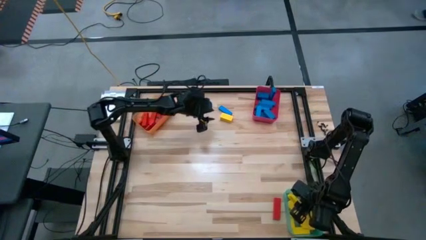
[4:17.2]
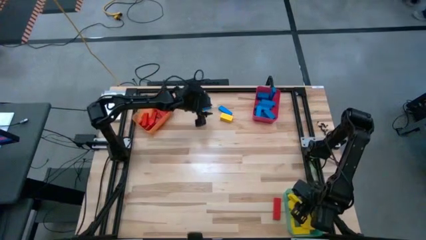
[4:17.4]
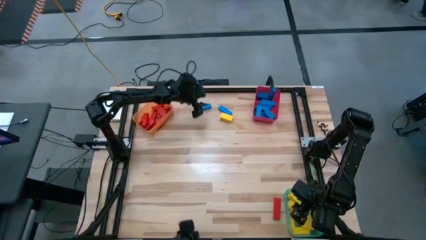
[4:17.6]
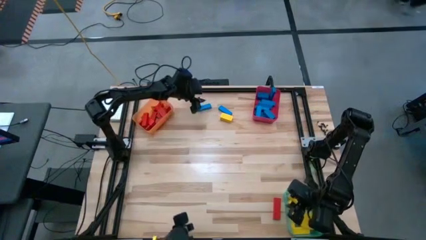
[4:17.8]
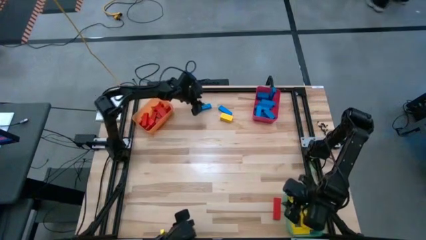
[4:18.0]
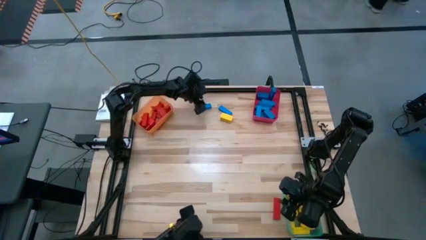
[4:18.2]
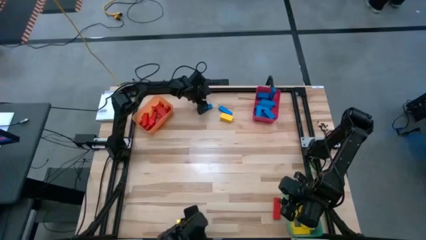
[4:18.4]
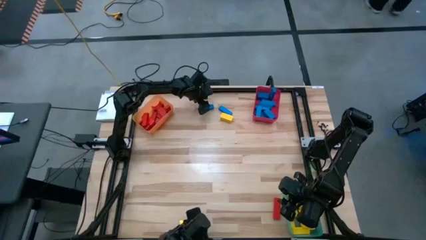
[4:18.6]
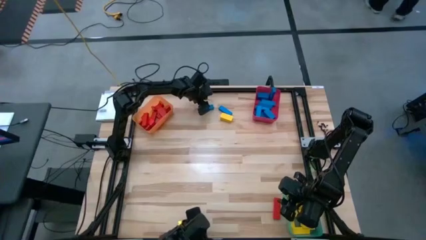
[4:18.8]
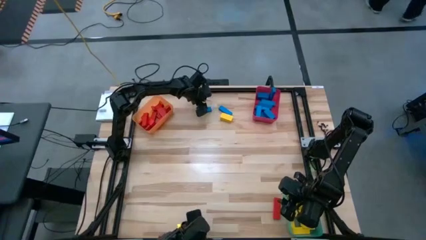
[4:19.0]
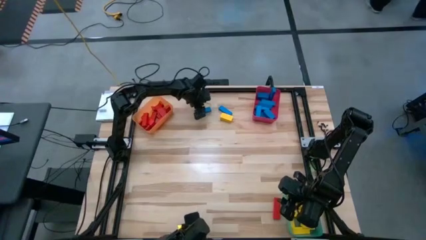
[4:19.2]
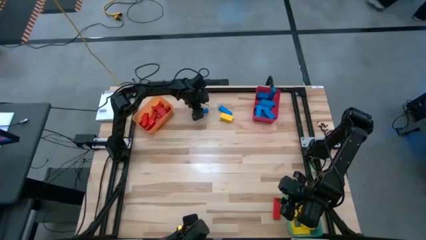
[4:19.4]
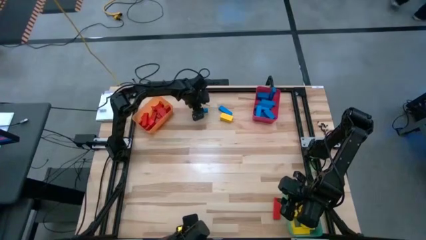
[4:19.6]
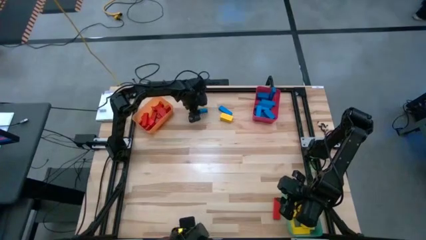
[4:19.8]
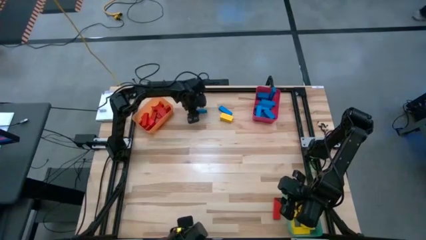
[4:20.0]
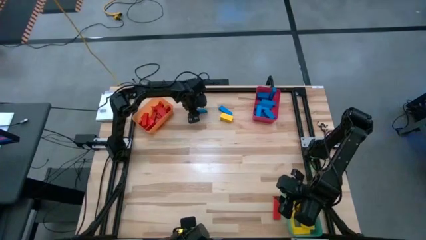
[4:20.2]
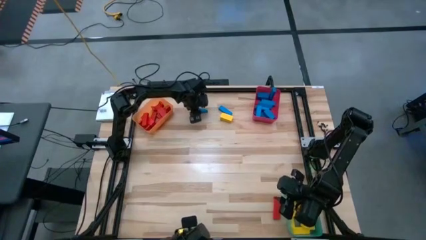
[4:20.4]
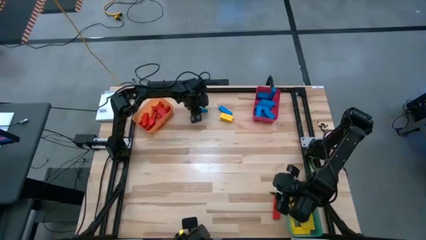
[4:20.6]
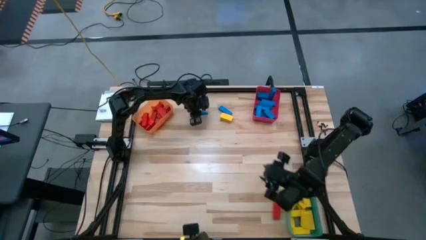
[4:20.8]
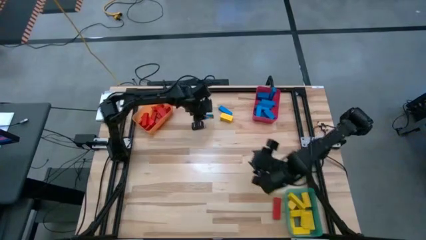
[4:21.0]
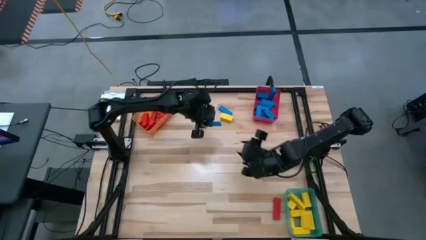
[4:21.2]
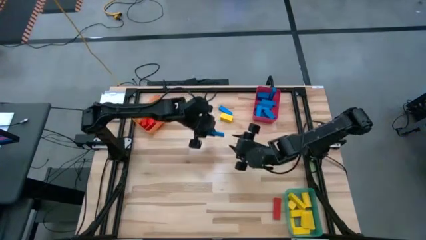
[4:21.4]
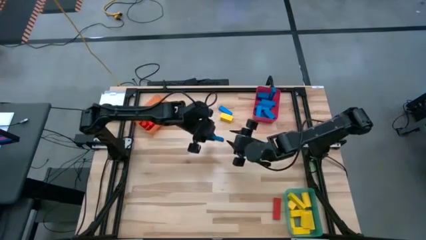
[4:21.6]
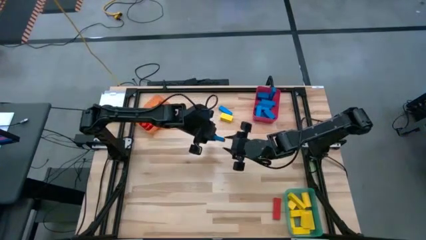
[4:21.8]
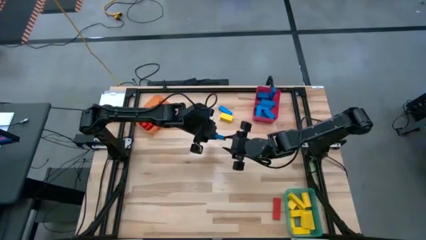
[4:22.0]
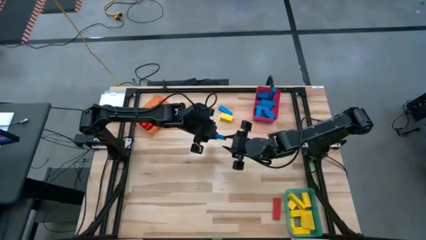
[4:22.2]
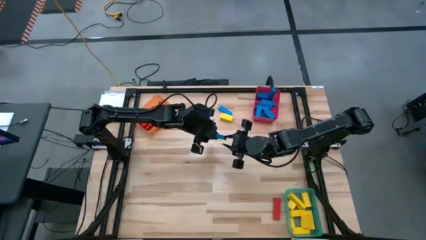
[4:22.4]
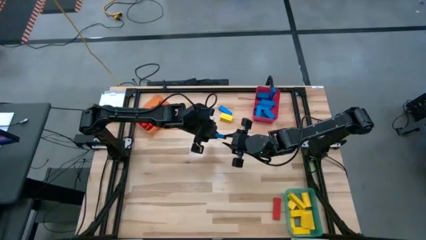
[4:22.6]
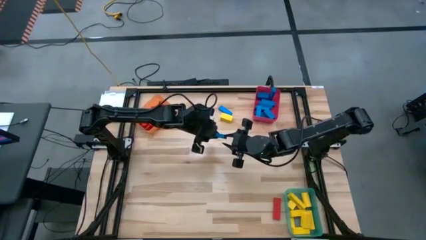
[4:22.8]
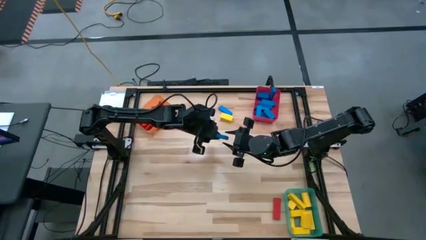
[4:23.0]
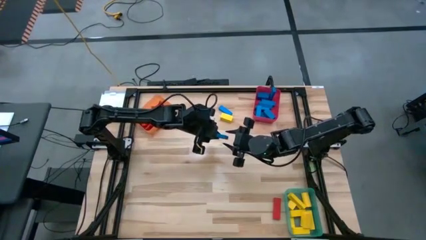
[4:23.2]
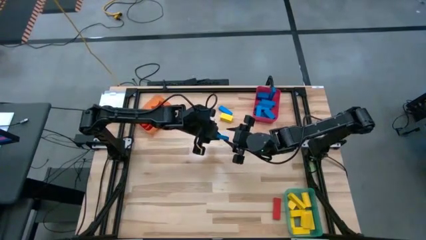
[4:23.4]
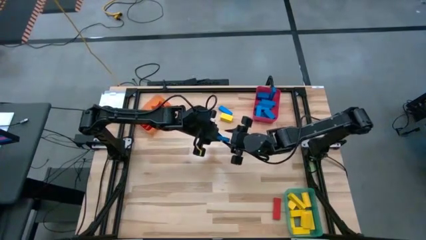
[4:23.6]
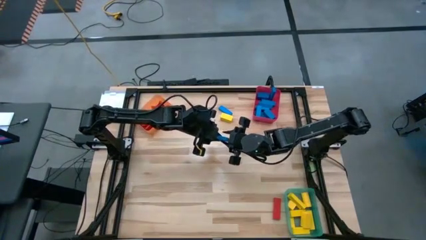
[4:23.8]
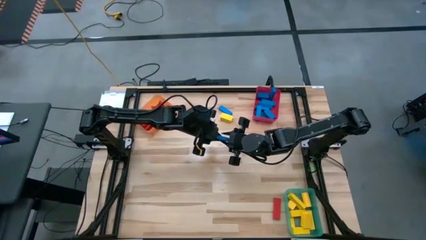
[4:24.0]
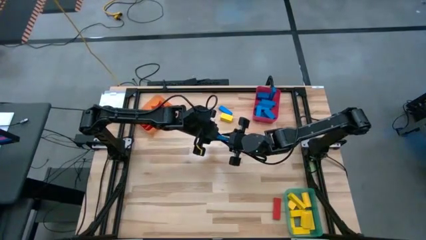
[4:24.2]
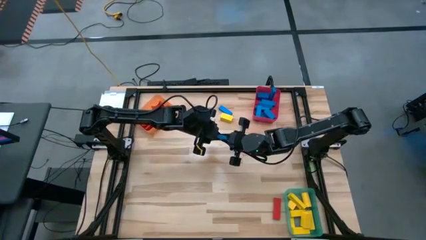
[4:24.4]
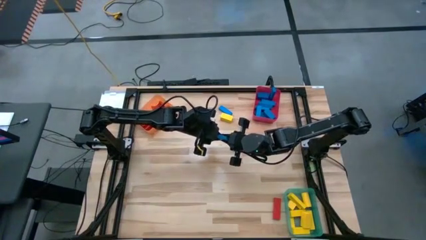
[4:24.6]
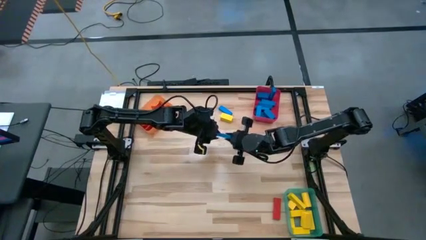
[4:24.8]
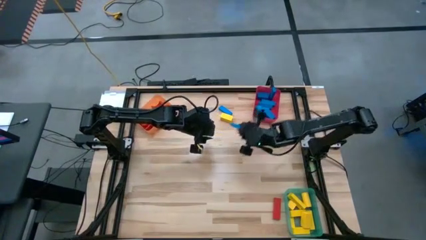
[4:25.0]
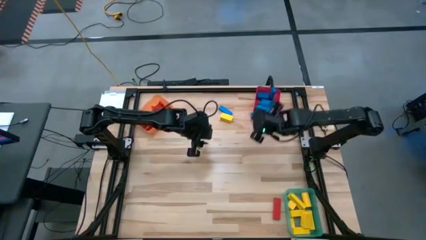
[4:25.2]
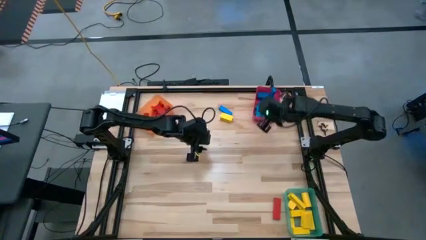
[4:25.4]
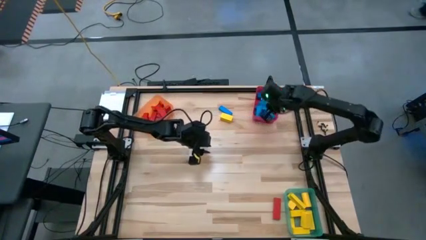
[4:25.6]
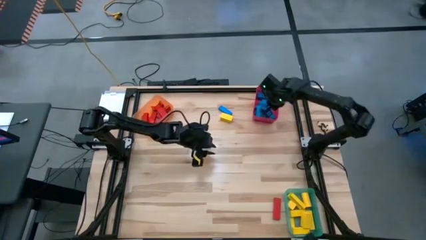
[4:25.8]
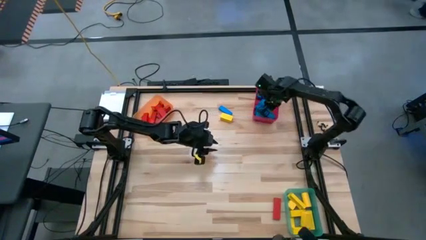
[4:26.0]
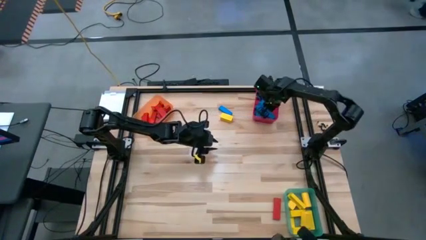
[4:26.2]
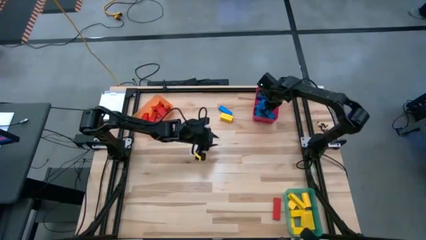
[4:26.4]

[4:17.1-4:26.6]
Task: Sort blocks
Put the blue block into the red bin

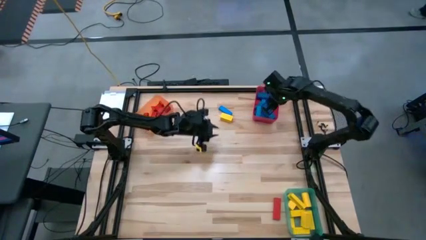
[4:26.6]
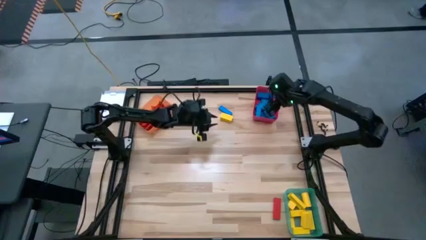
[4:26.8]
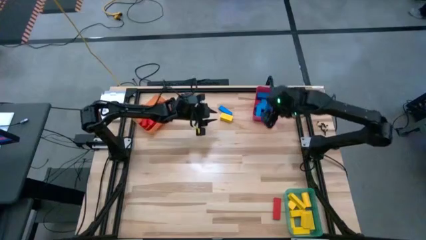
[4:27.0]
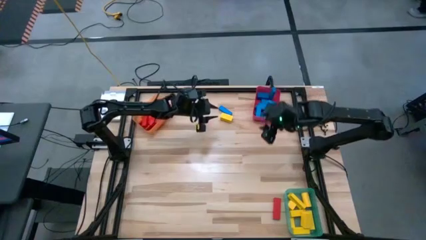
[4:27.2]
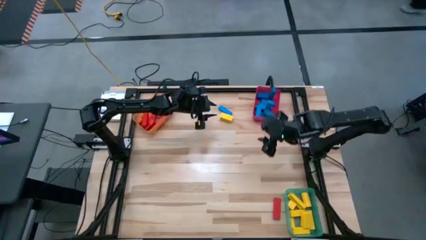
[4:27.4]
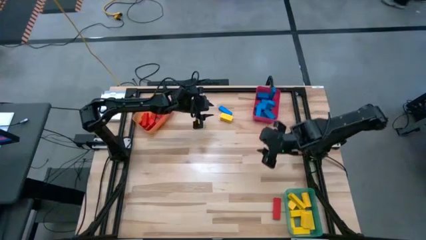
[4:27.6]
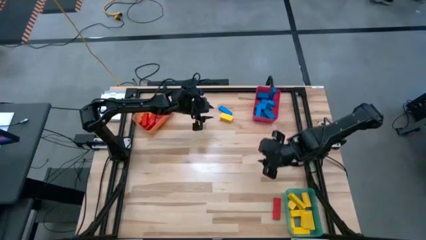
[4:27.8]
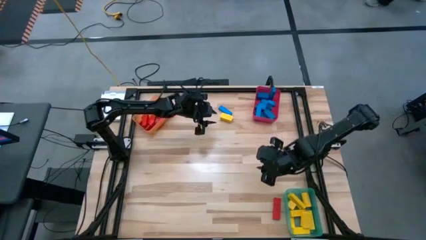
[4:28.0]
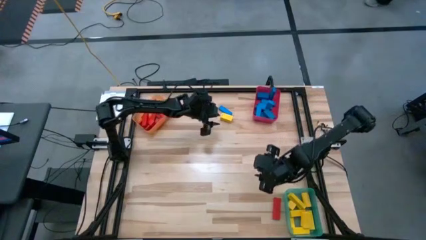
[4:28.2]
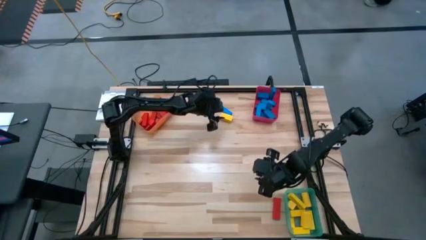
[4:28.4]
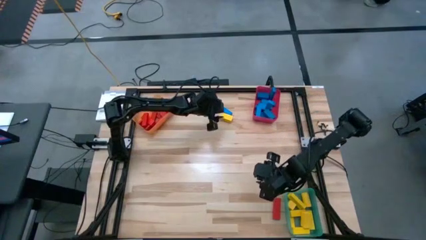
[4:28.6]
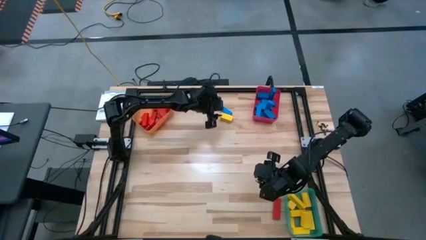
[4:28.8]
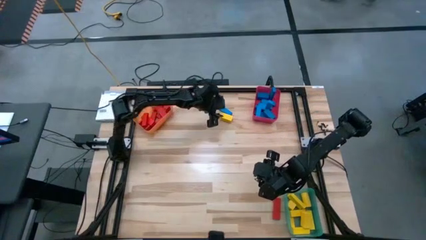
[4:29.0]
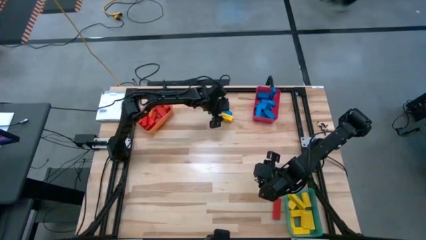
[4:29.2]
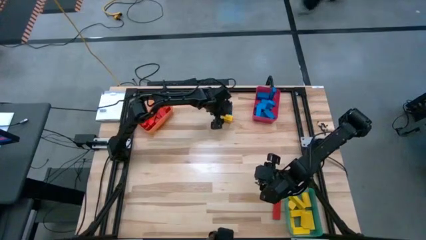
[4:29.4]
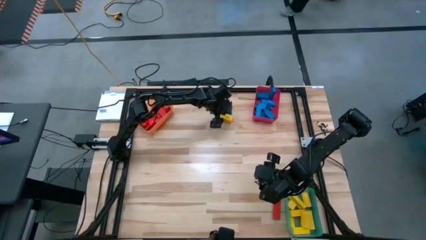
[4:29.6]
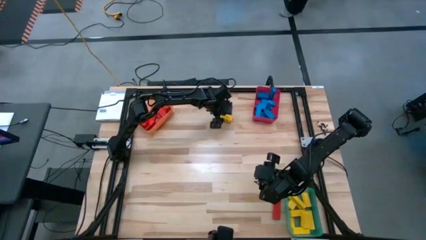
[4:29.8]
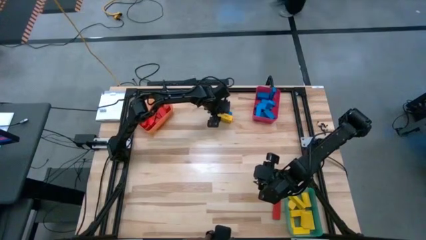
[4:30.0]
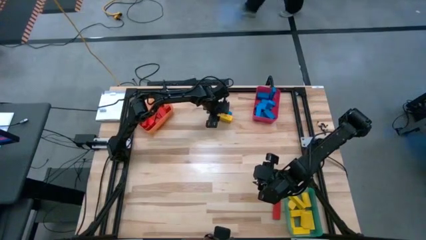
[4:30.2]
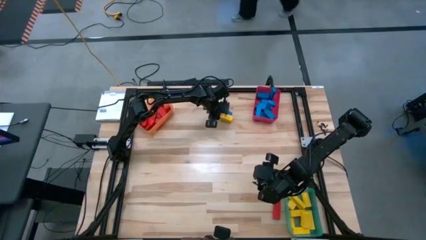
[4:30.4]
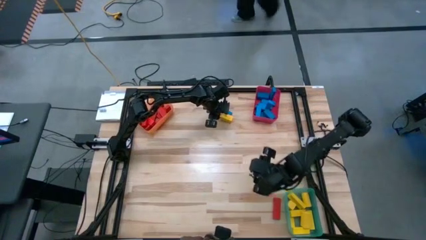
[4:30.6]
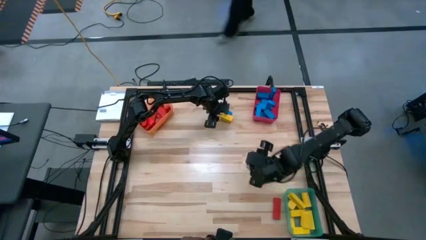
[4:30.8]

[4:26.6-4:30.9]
Put the yellow block into the green bin
